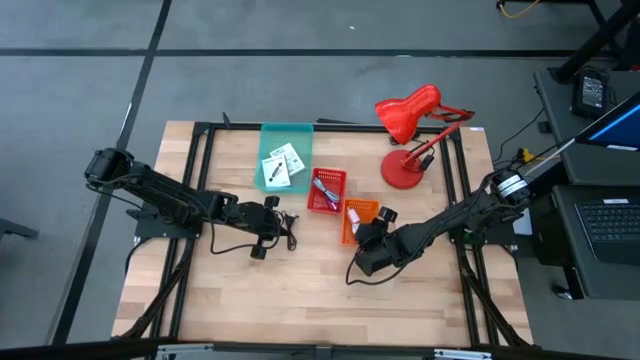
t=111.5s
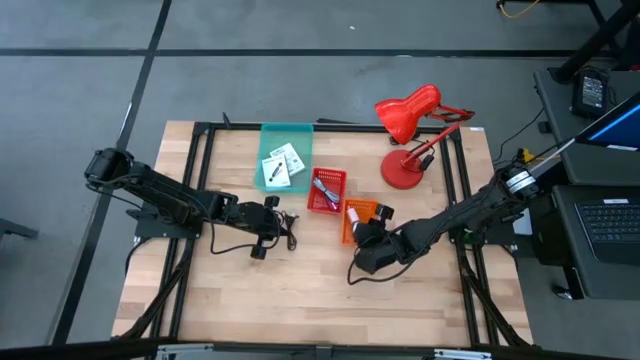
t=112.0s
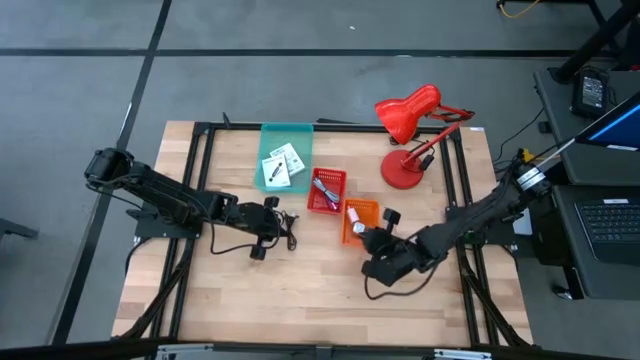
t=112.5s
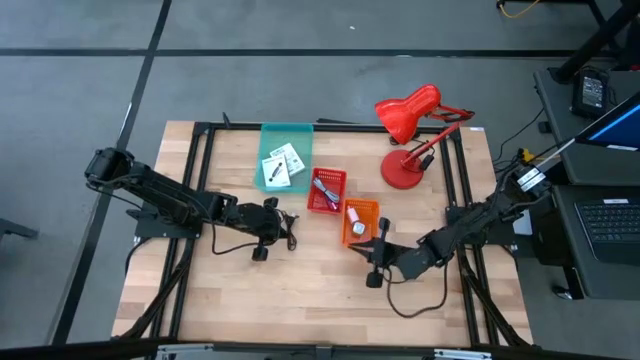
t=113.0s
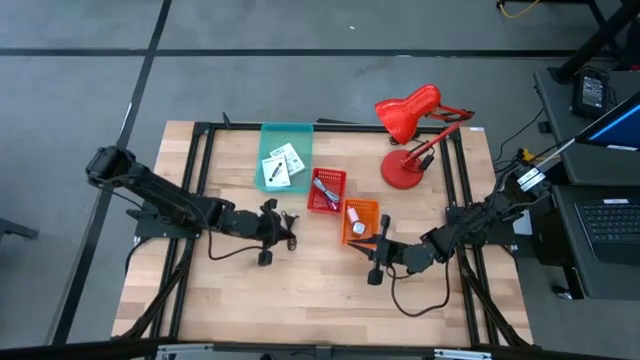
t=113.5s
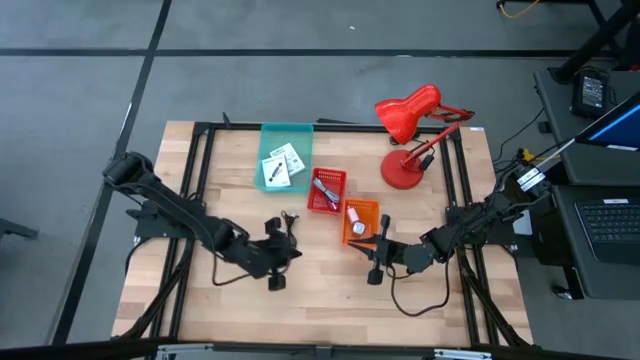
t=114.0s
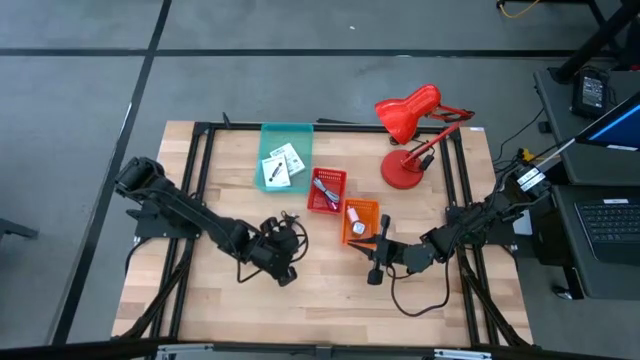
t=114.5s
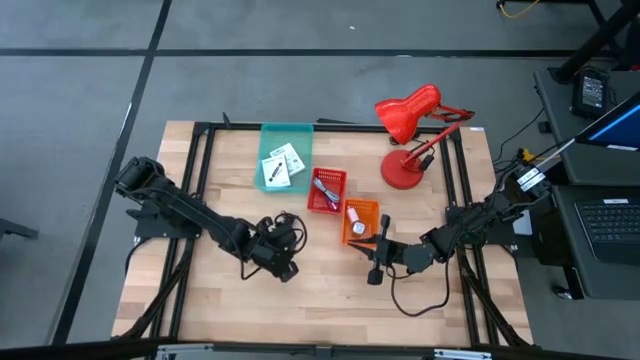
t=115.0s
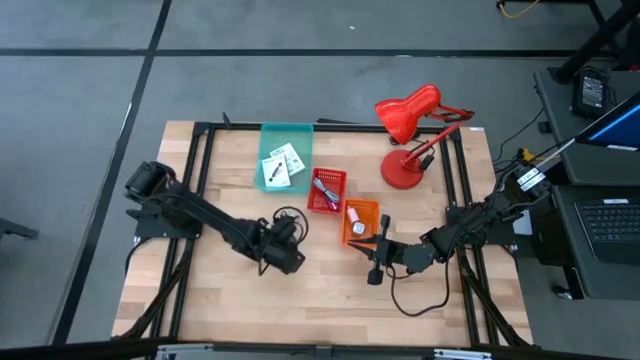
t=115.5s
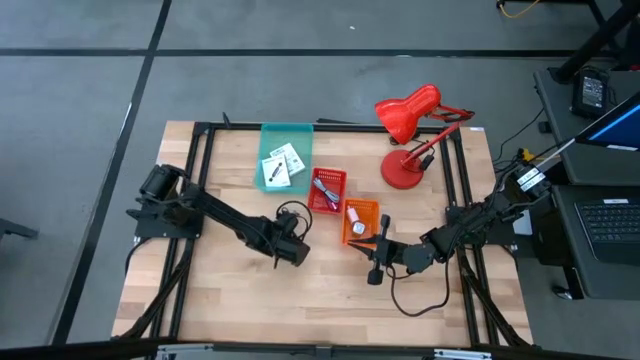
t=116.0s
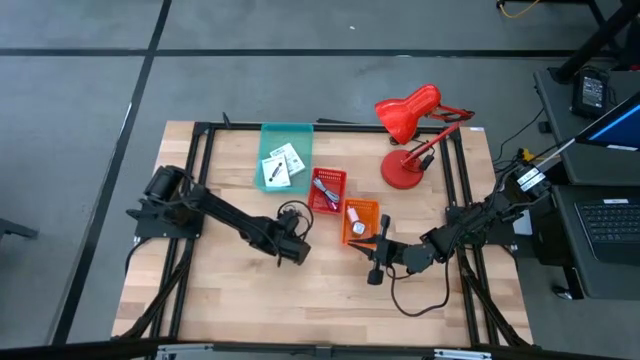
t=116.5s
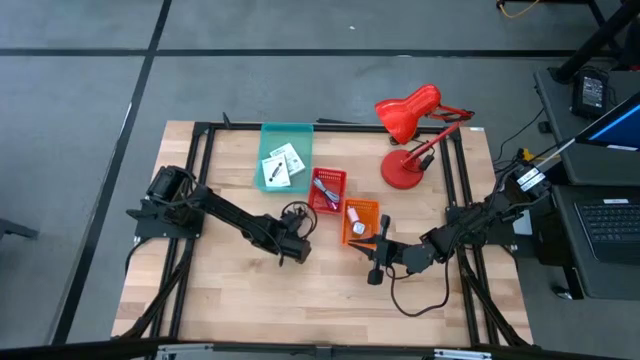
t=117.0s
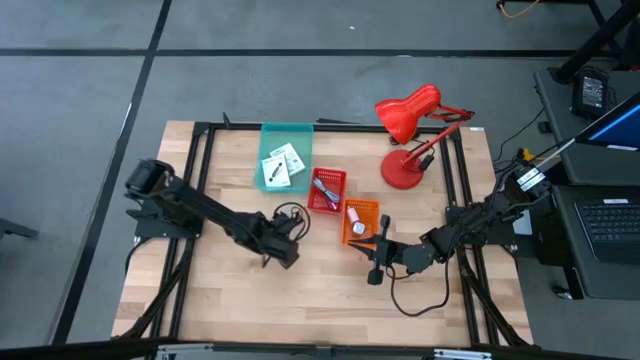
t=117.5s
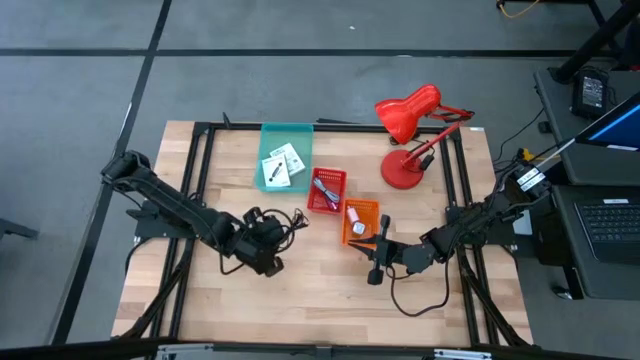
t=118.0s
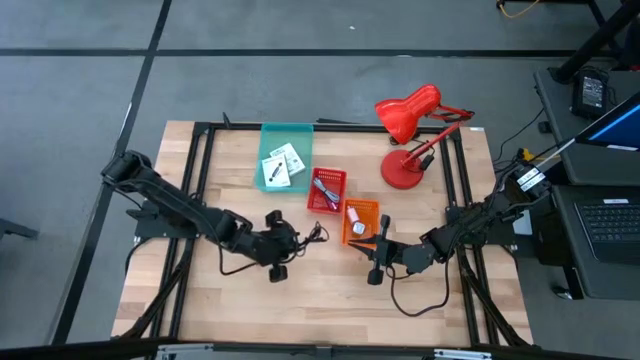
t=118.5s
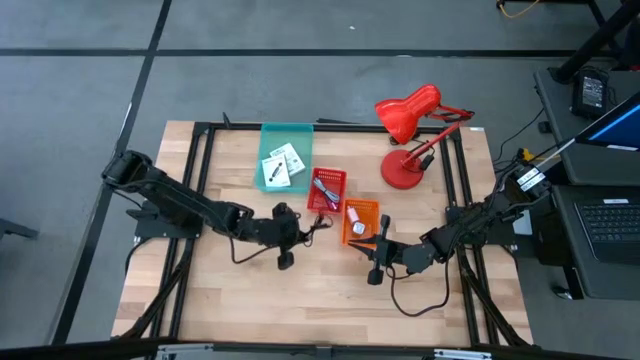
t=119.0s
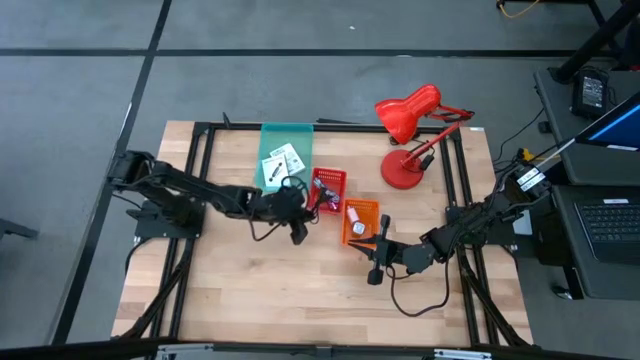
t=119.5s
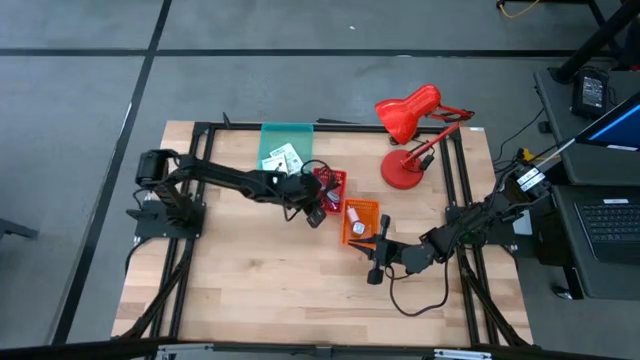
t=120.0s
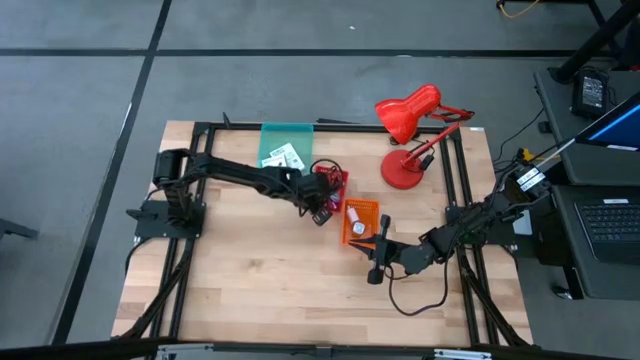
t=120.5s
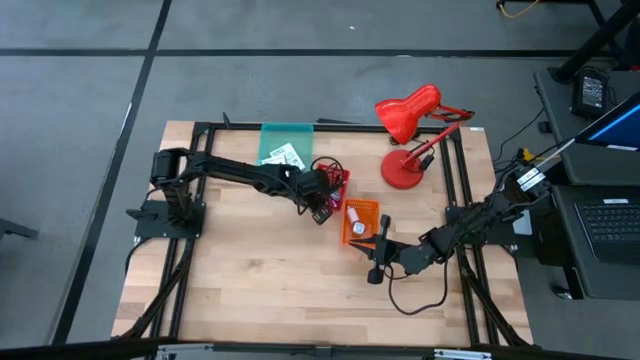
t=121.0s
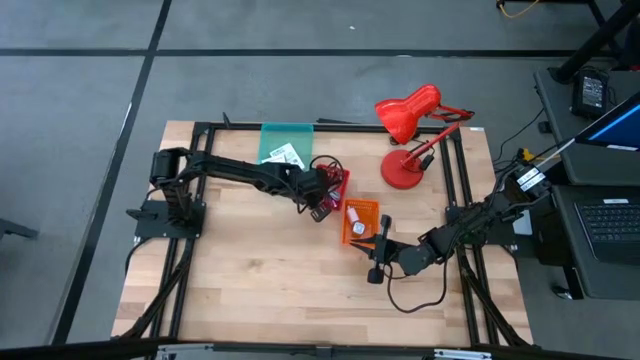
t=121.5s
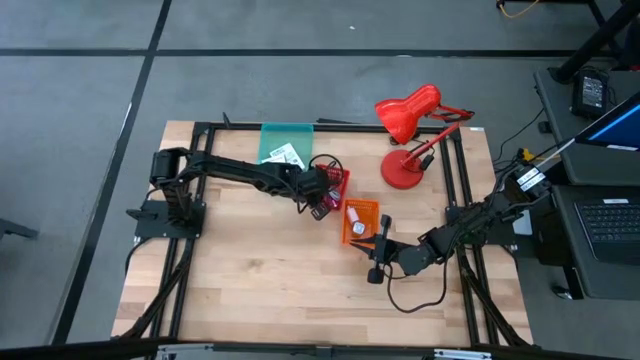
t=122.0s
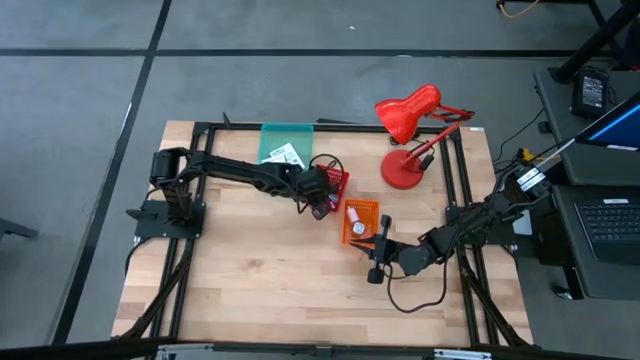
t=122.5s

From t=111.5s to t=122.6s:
Task: Pick and place items into bin
Put the black charger cable into the red basket

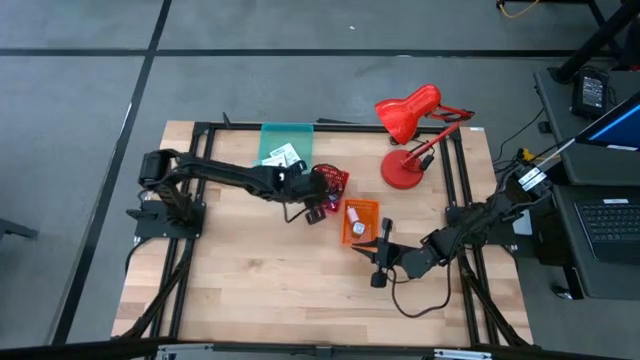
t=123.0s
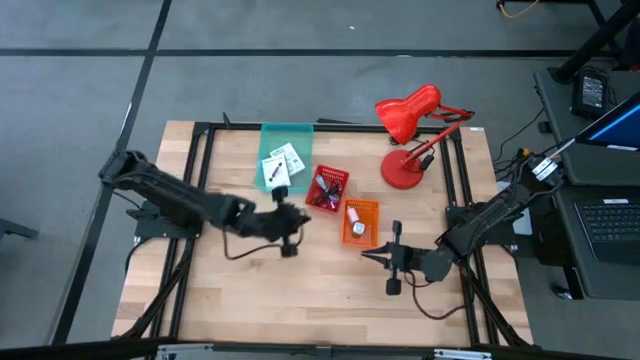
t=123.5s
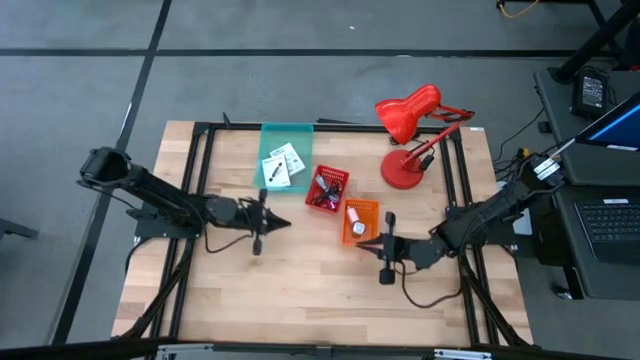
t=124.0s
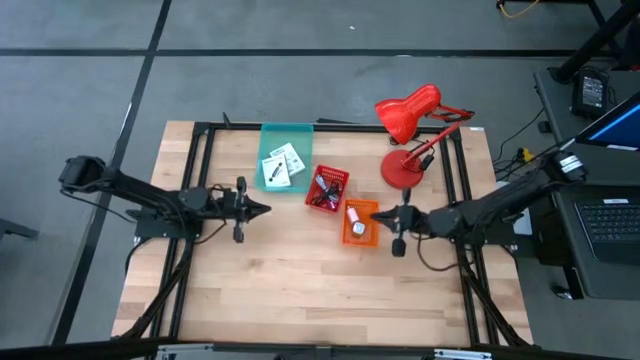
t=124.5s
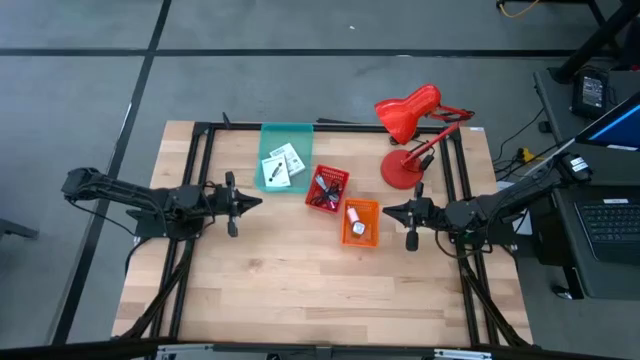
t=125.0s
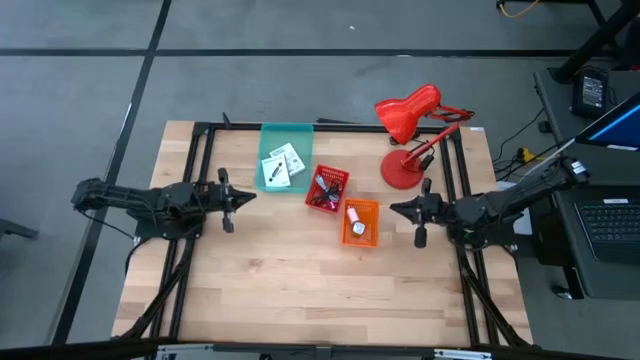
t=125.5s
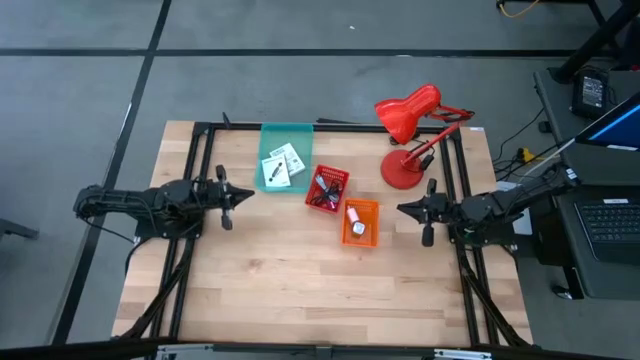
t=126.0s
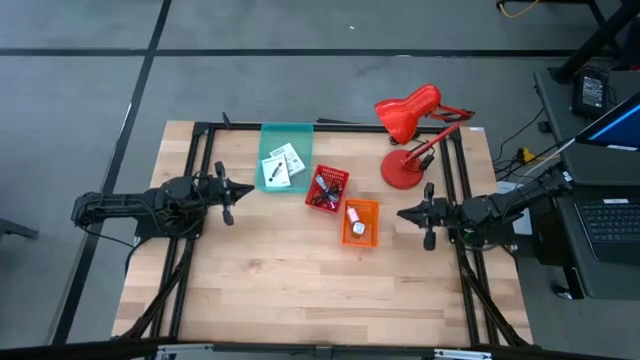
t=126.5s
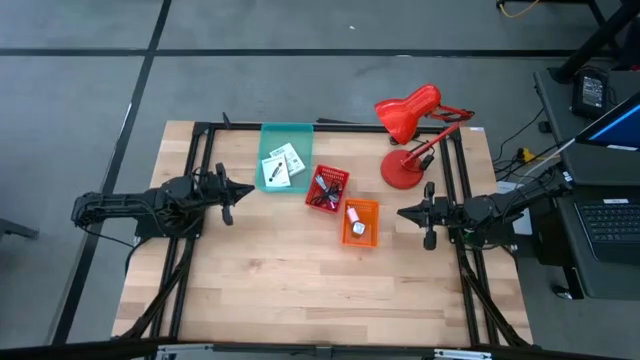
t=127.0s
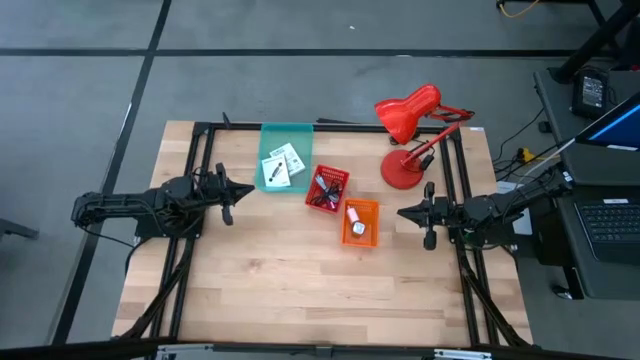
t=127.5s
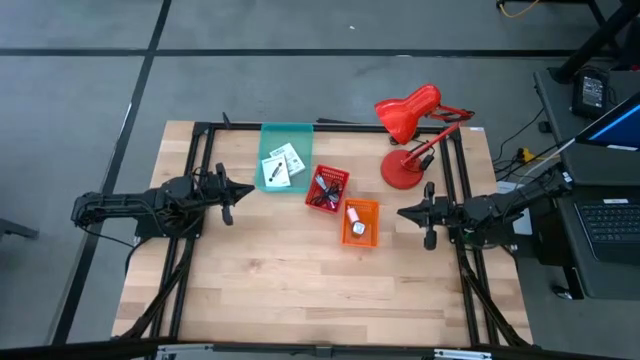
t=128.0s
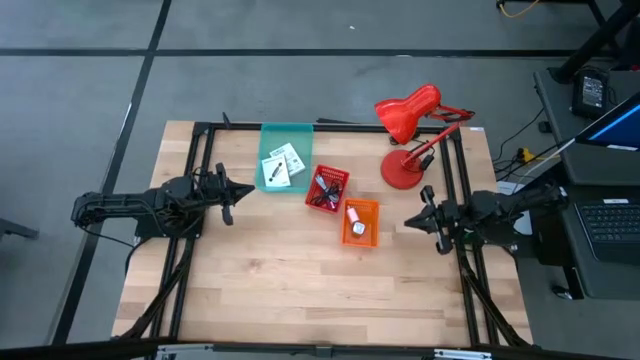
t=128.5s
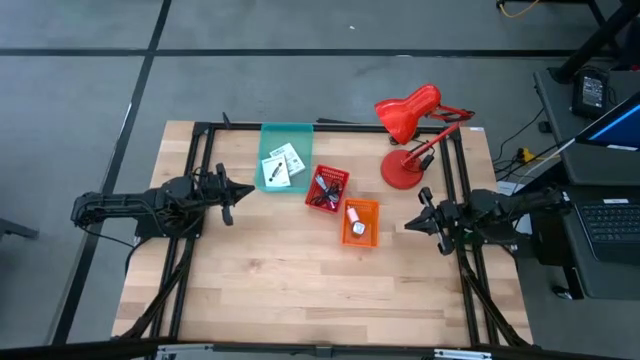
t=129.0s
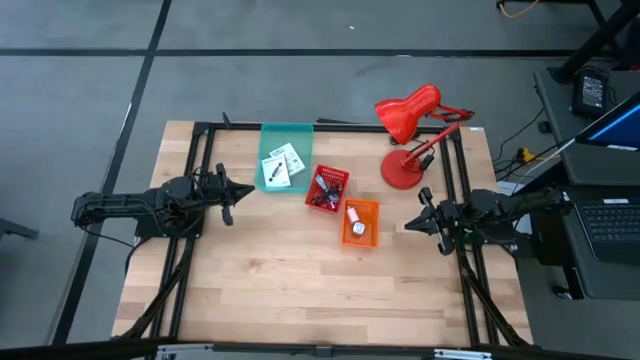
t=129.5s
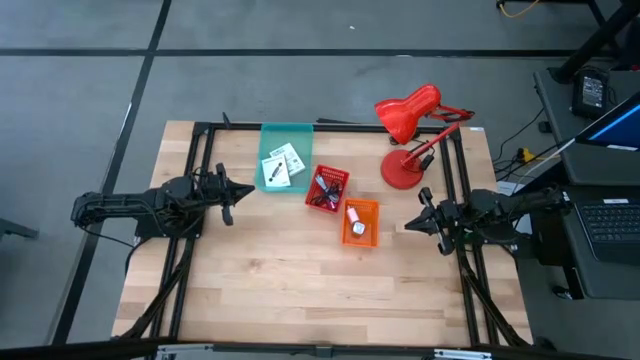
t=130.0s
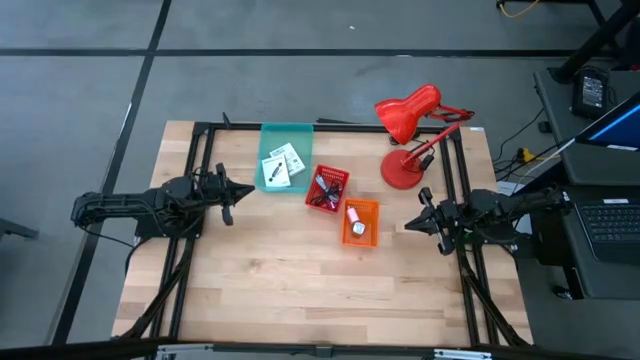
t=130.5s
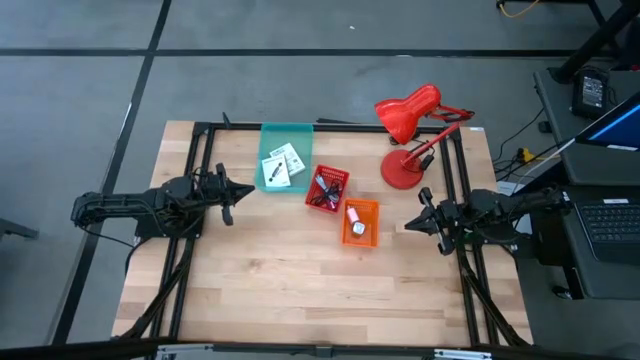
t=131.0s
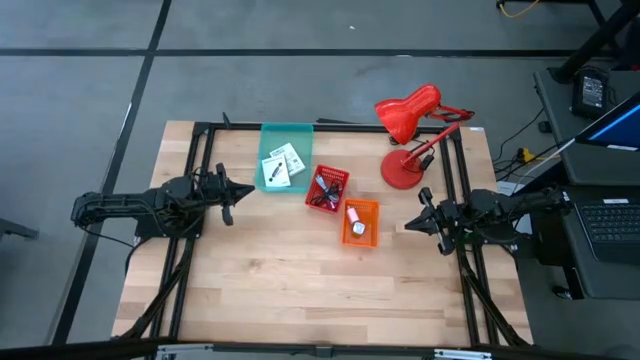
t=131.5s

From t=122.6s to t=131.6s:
Return to home position

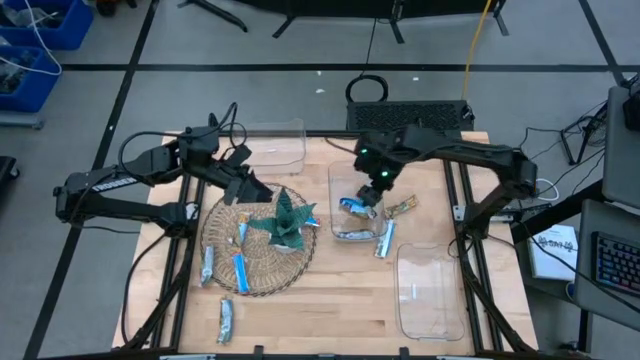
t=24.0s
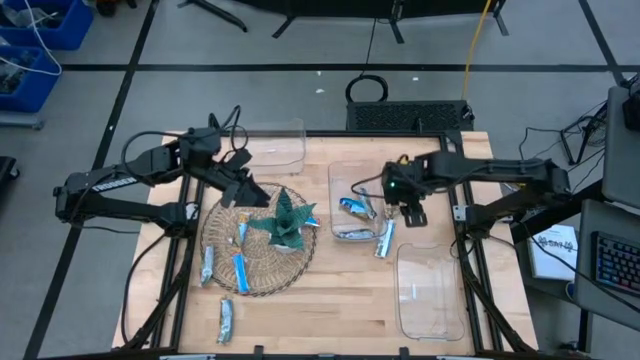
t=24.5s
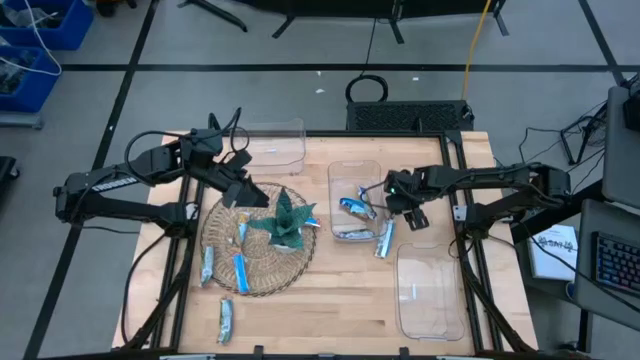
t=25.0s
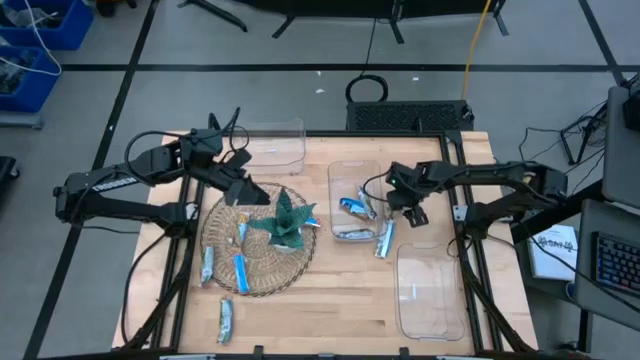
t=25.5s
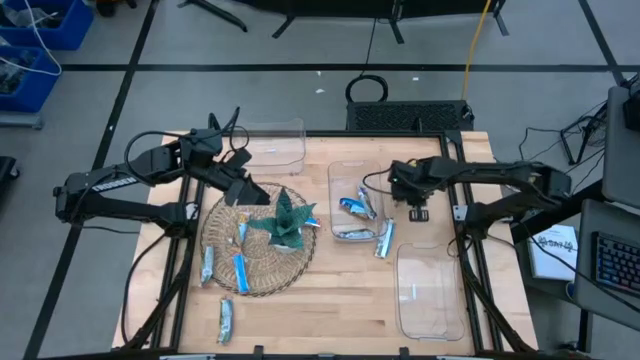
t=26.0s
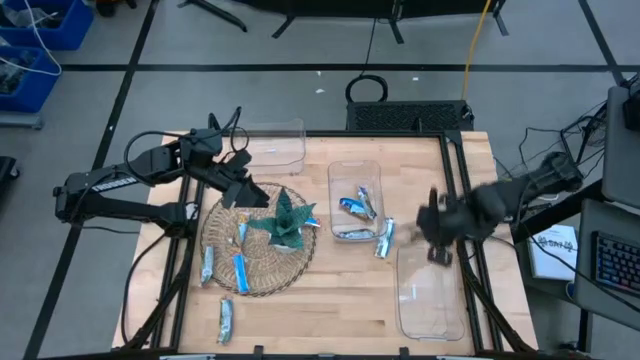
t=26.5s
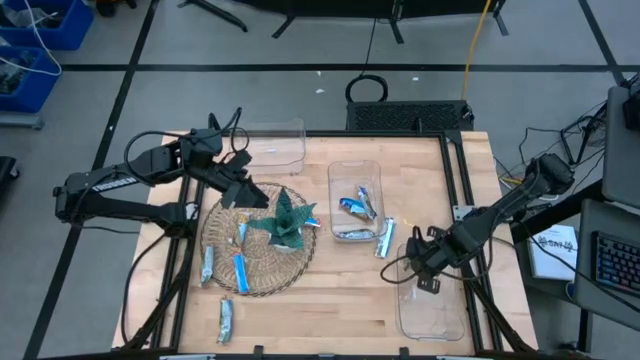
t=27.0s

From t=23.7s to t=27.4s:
Task: Pick and place Granola Bars by type
Put the orange granola bar into the bottom transparent bin
